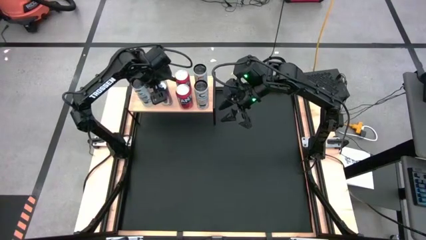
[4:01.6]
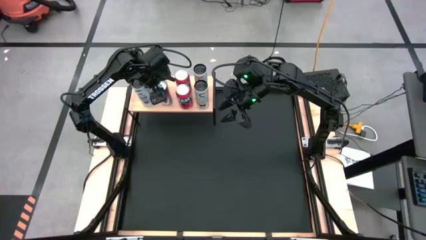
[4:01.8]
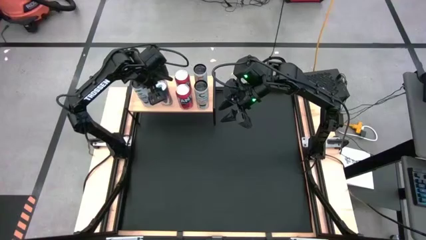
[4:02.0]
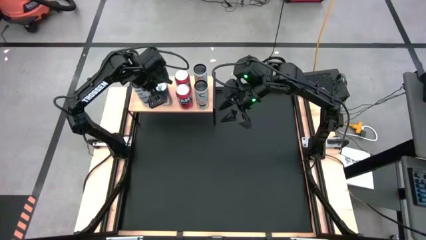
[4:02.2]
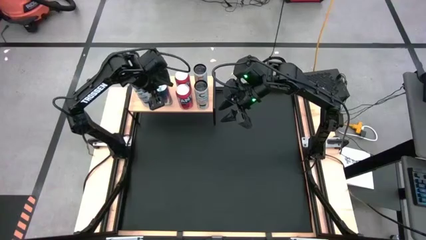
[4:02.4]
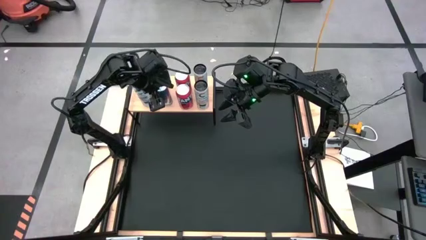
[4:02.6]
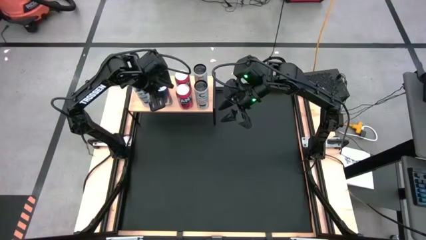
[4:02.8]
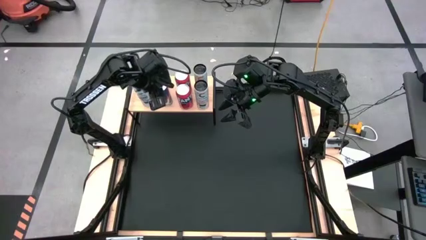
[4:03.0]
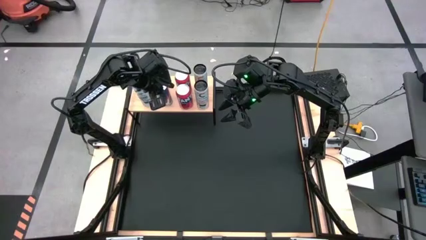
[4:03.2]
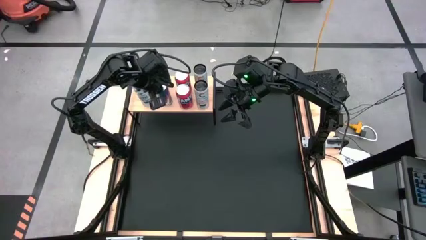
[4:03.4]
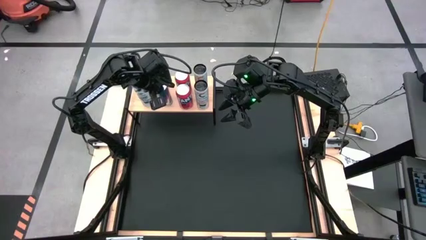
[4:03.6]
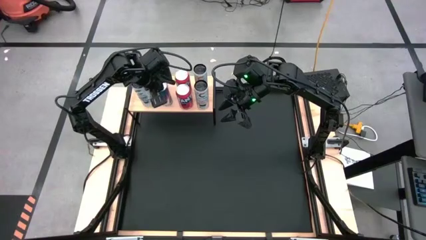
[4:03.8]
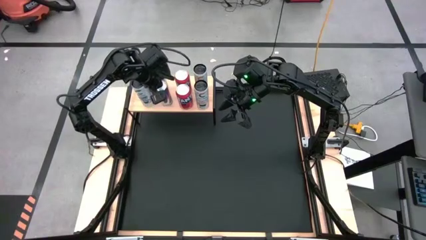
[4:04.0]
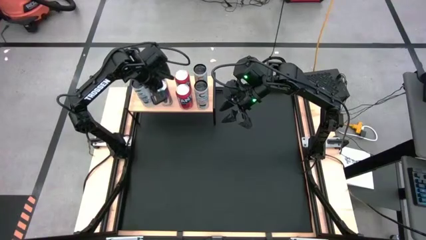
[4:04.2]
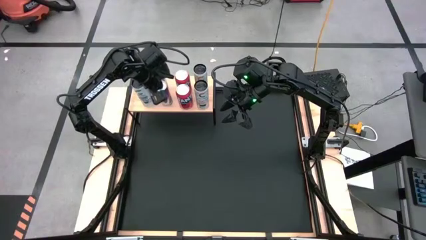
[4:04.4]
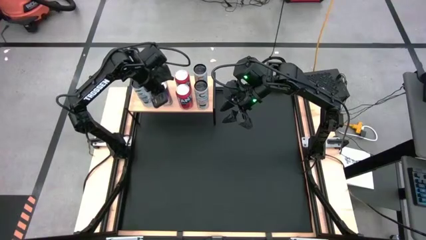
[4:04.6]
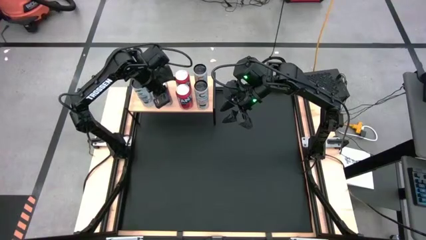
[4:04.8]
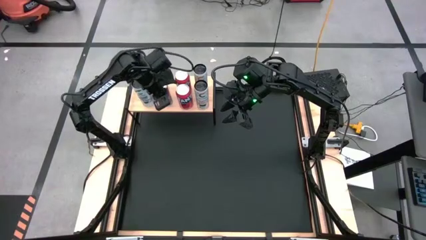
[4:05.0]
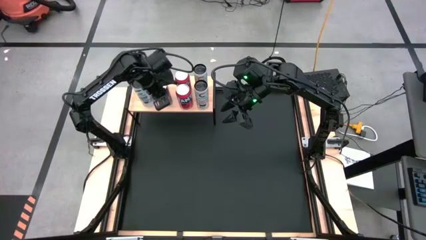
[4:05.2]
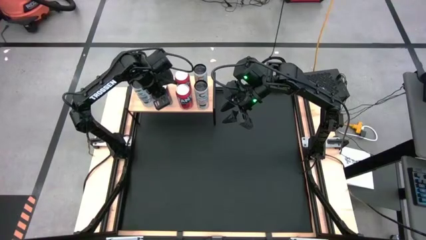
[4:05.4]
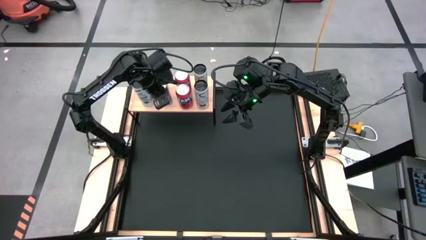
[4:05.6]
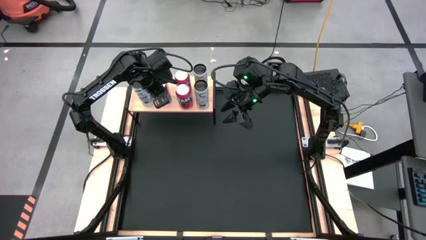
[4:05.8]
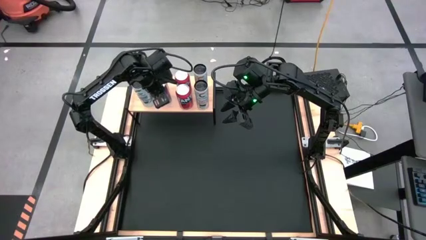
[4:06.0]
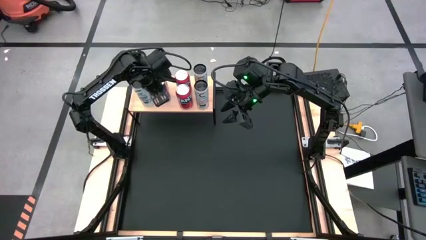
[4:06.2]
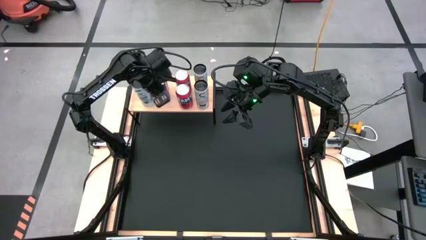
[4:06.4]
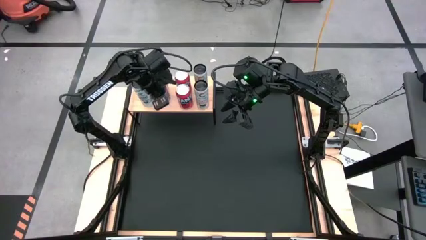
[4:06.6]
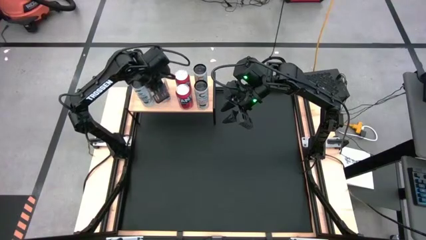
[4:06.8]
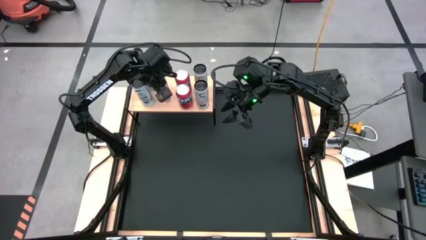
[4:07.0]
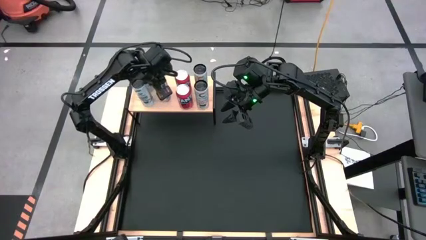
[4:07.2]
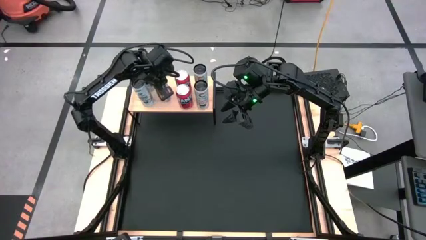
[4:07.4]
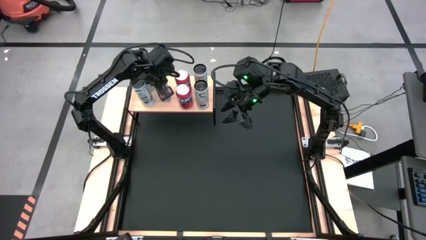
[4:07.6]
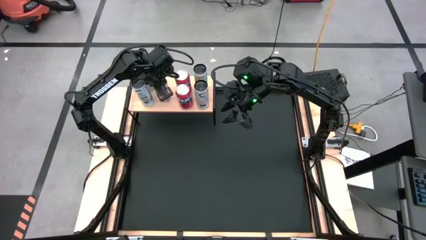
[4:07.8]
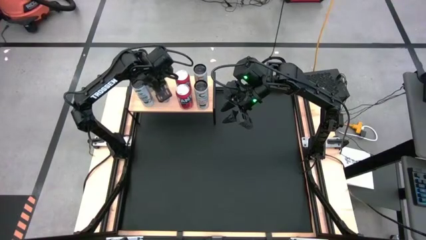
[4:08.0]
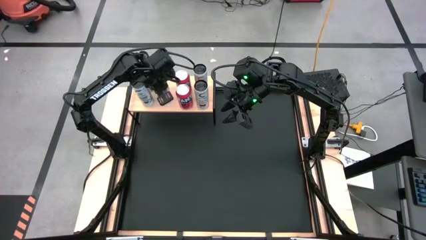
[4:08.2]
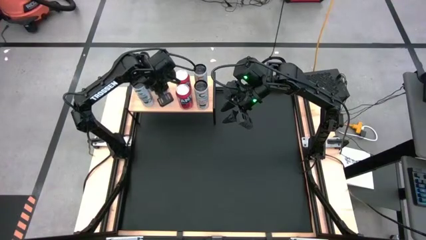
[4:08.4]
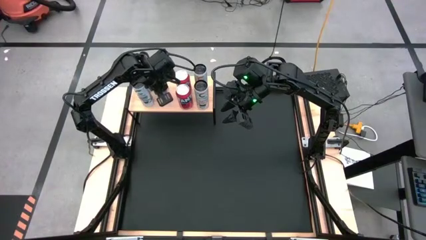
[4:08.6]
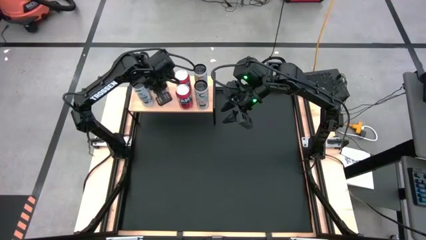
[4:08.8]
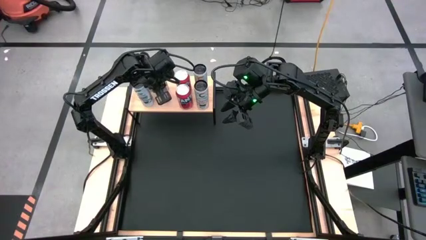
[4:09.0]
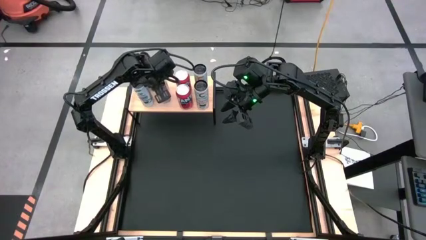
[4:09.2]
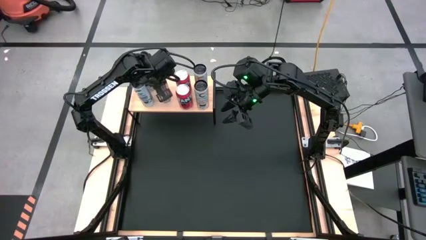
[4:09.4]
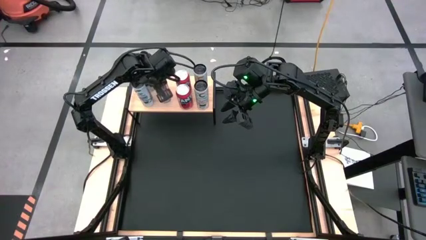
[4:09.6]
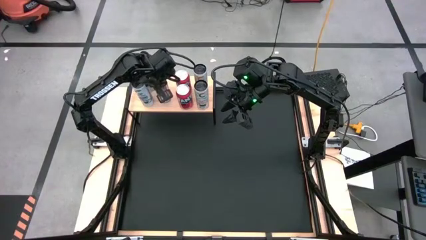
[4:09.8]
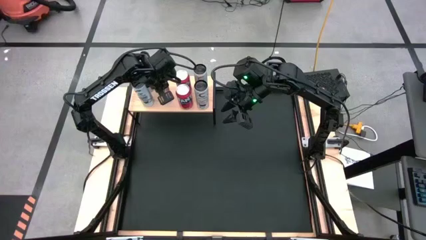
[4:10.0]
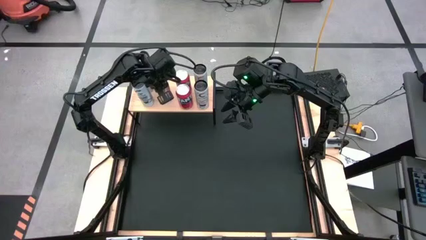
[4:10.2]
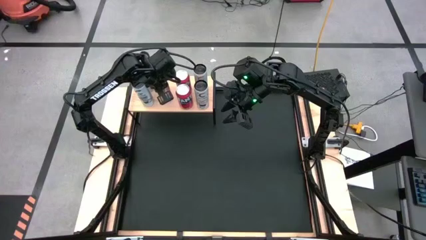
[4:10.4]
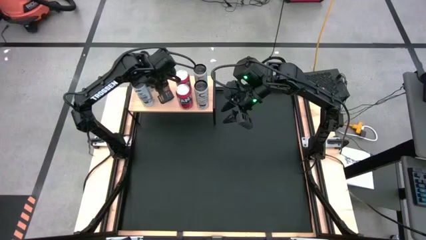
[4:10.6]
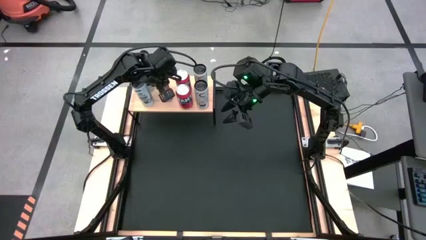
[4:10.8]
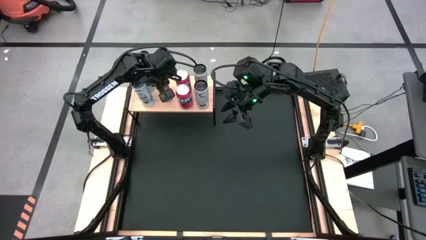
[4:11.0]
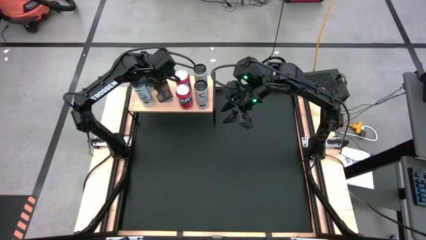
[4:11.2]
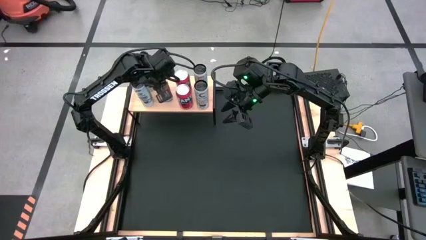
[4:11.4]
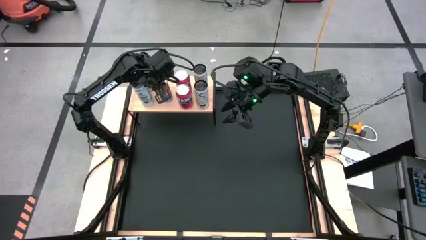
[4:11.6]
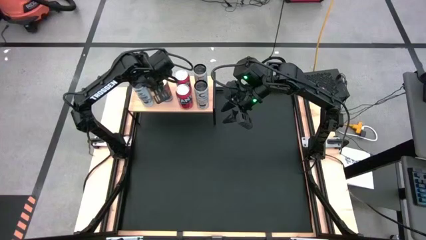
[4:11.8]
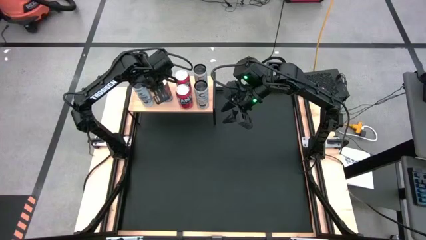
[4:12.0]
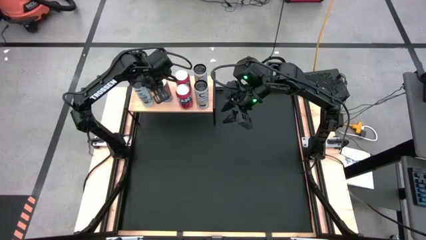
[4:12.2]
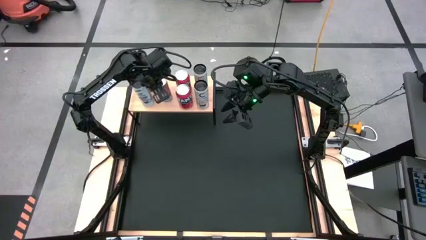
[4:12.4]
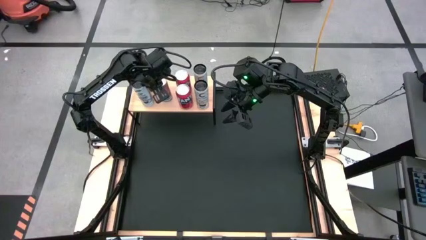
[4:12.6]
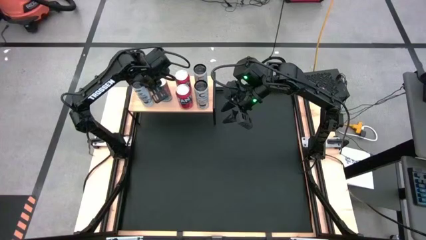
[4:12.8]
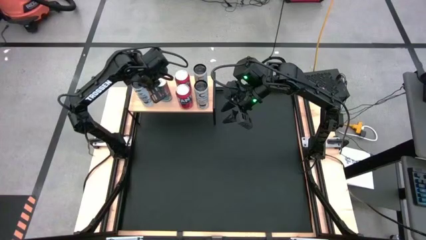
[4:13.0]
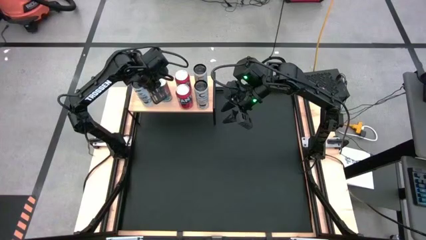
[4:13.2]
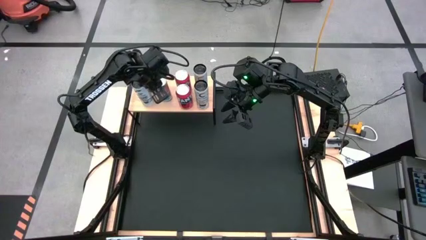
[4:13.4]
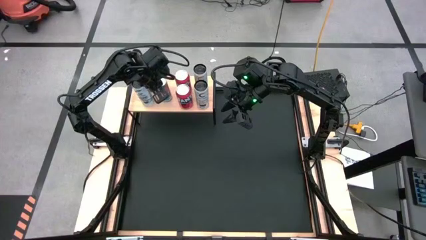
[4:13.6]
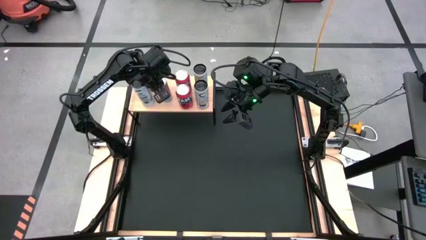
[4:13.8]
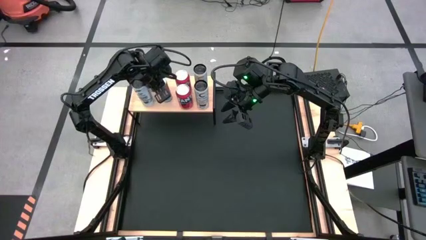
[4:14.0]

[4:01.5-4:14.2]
Task: Place canned beverage on shelf
Put the blue soda can aligned with the other blue soda can on the shelf

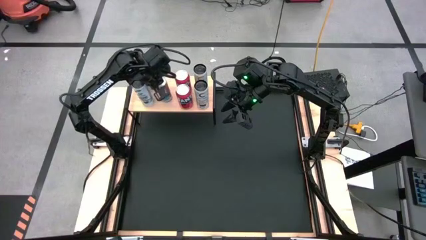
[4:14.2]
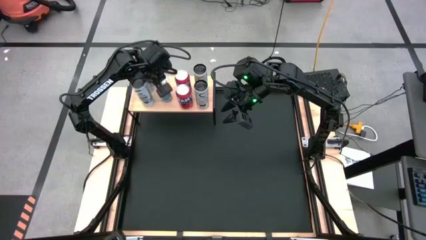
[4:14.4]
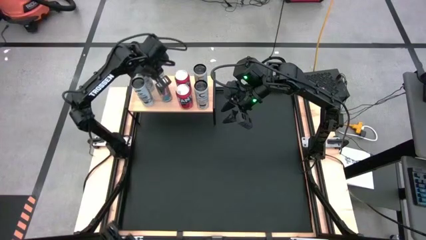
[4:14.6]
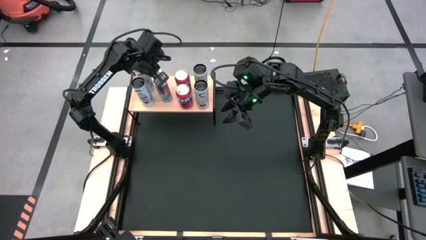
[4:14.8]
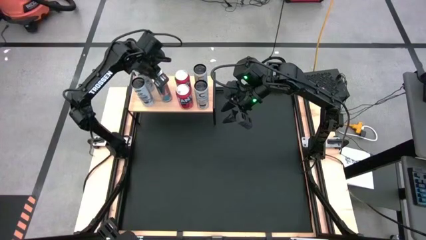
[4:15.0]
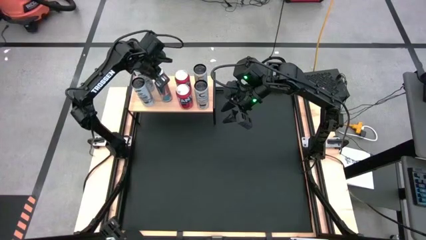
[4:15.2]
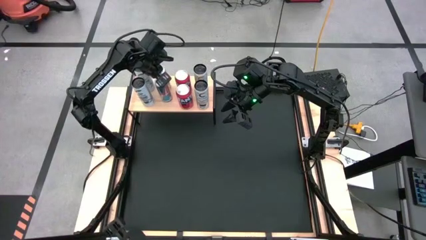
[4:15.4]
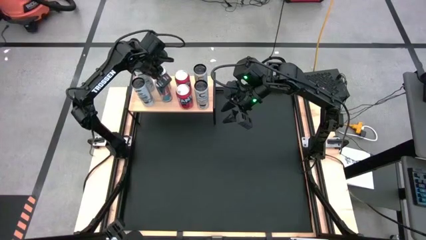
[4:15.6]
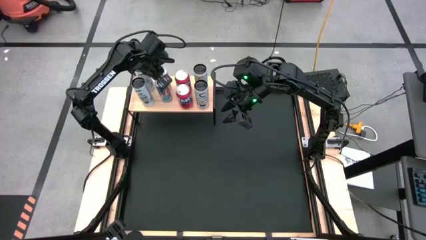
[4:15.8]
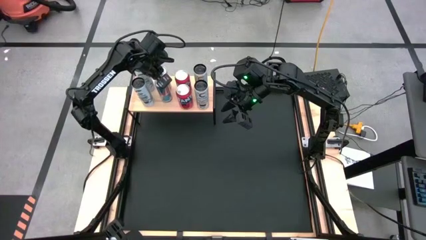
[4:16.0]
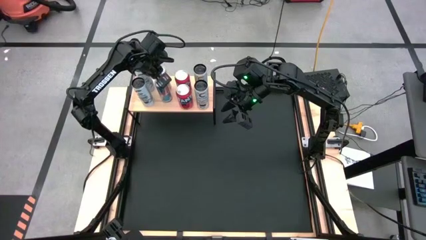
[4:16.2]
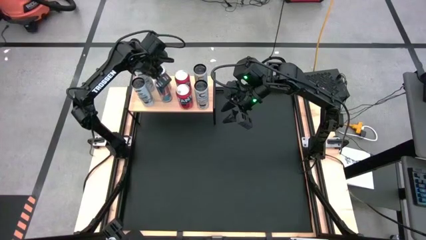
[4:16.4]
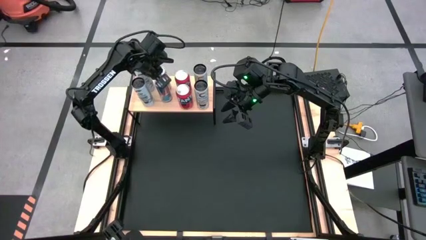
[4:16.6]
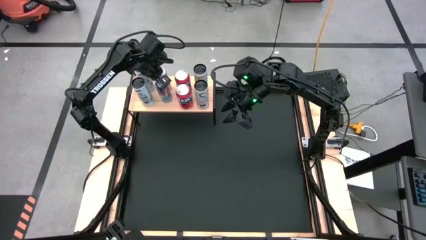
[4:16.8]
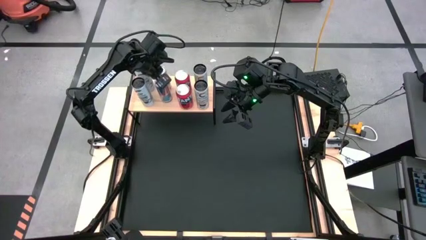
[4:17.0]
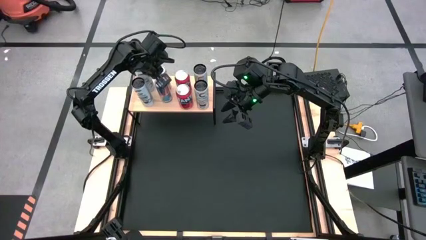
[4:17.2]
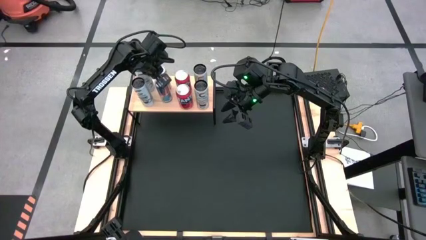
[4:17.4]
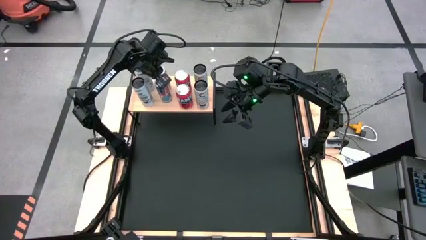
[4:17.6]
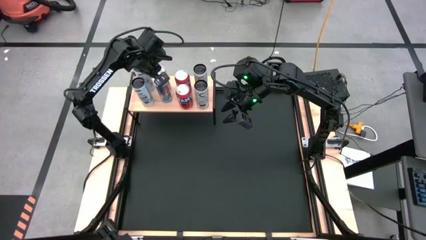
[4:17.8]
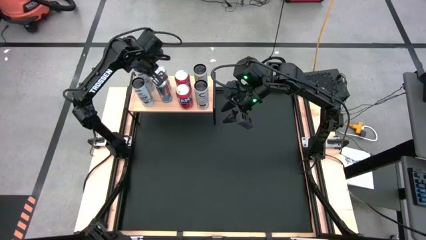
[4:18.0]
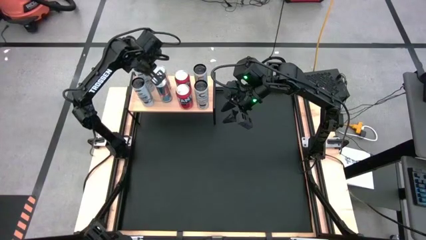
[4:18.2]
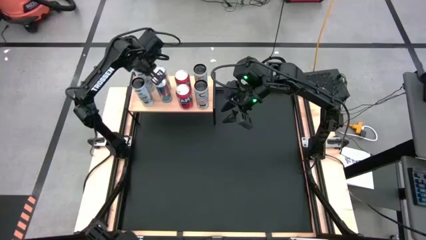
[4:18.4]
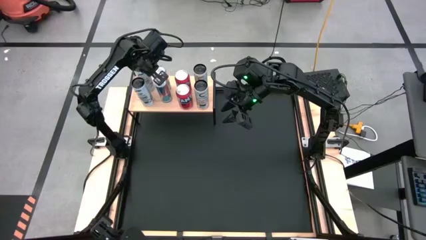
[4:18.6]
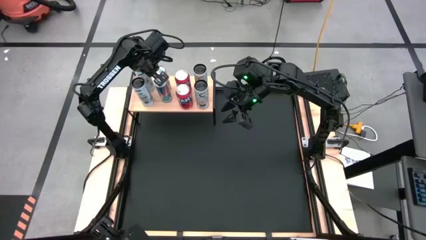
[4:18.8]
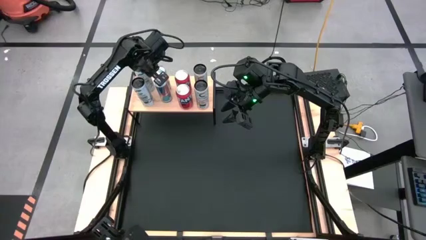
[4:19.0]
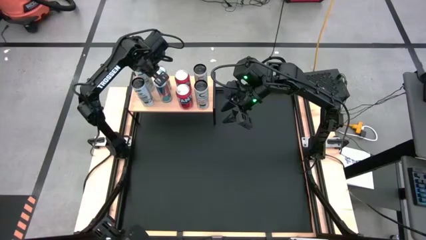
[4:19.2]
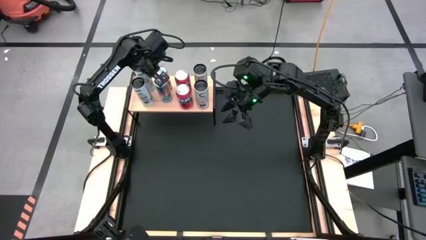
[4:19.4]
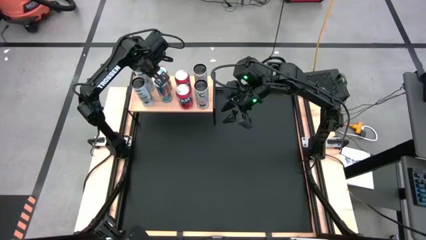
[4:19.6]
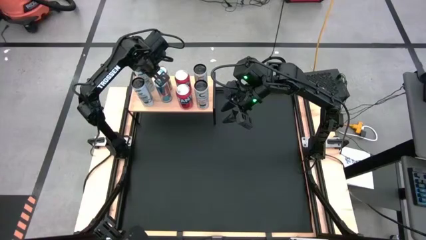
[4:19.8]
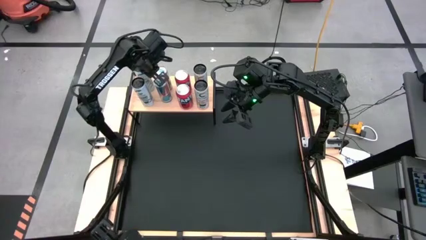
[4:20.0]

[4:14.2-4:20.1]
Adjust the top blue soda can on the shelf
